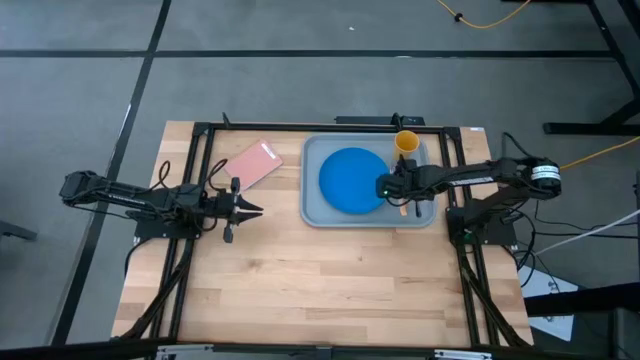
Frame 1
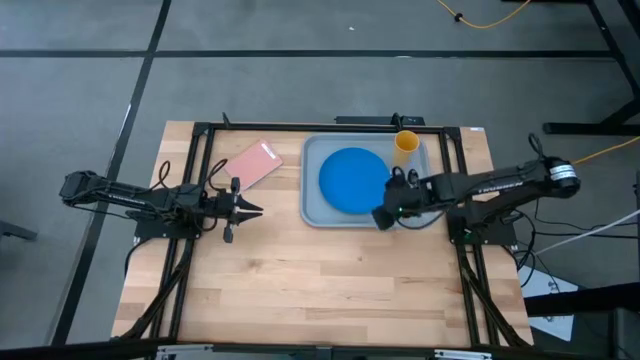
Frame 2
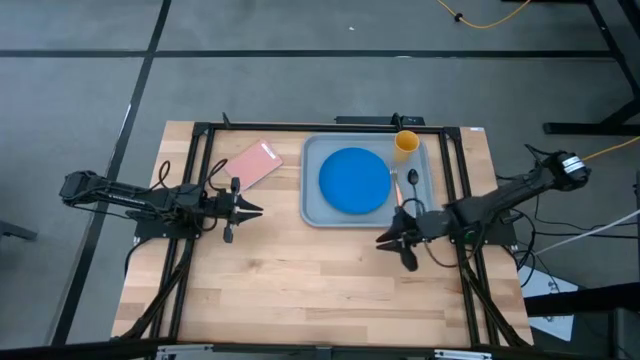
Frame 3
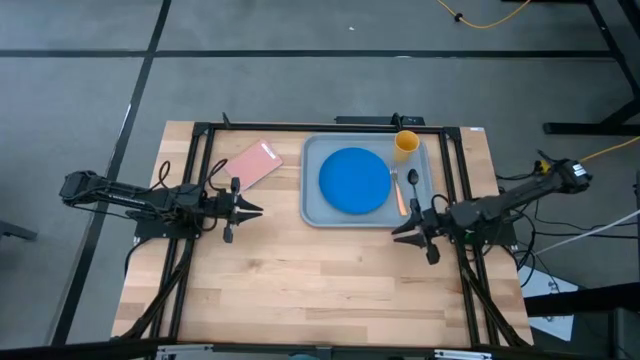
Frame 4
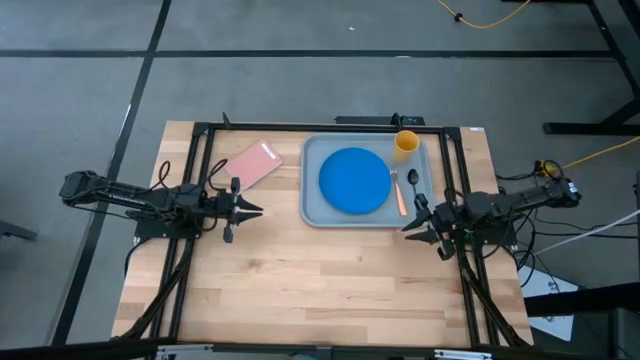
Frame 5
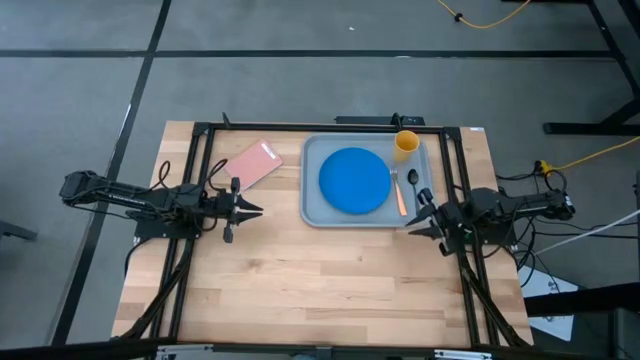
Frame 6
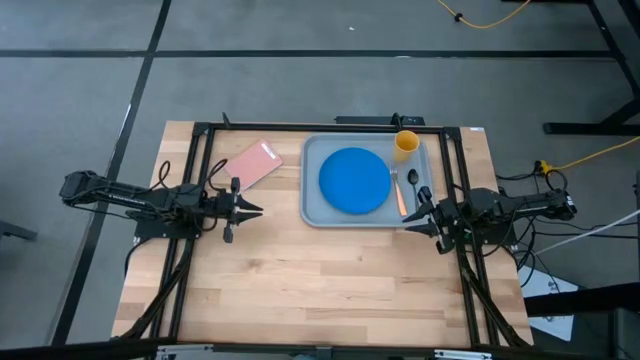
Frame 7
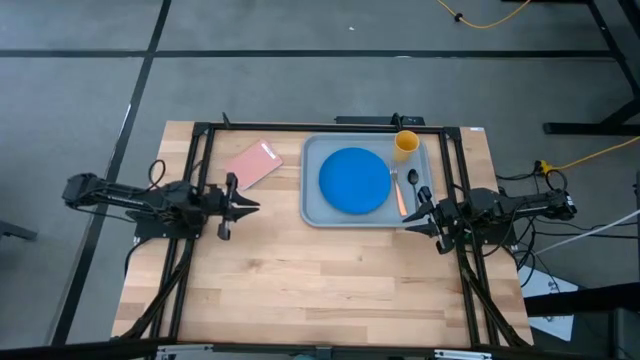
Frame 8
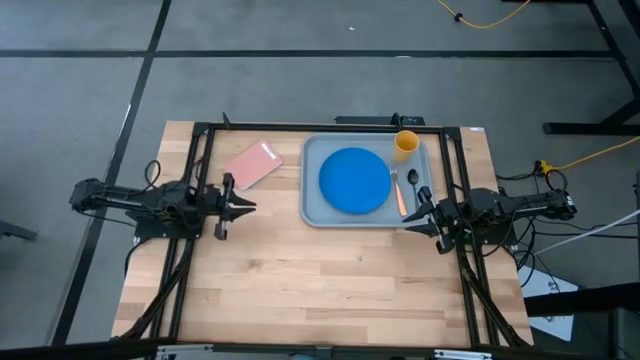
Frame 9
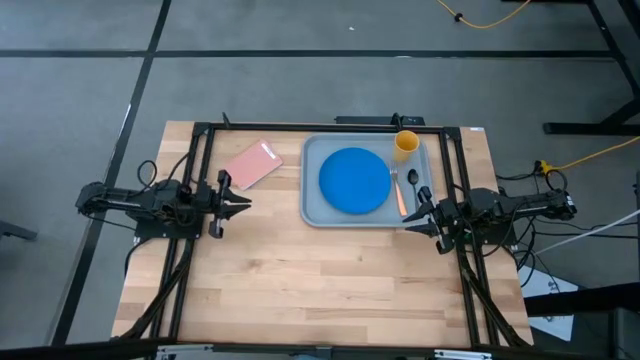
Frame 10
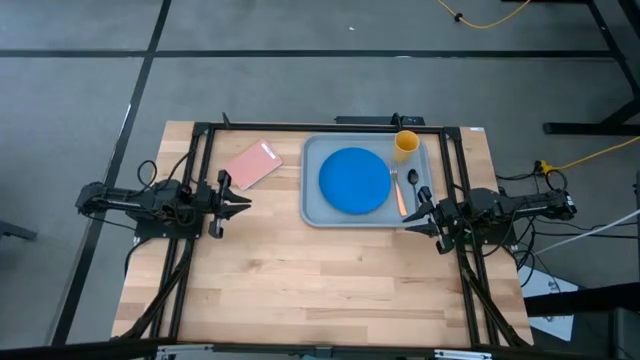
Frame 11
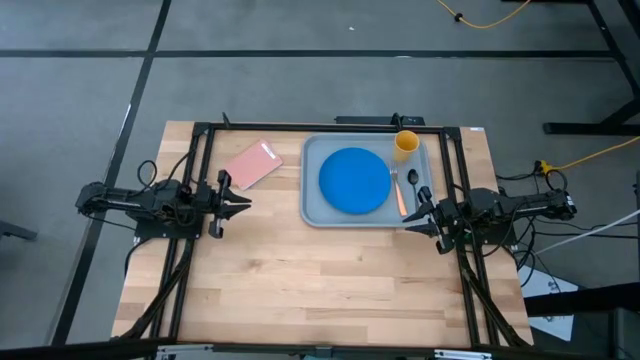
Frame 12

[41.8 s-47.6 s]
Task: Pick and place plate/cup/fork/spoon on tray
Return to Home Position

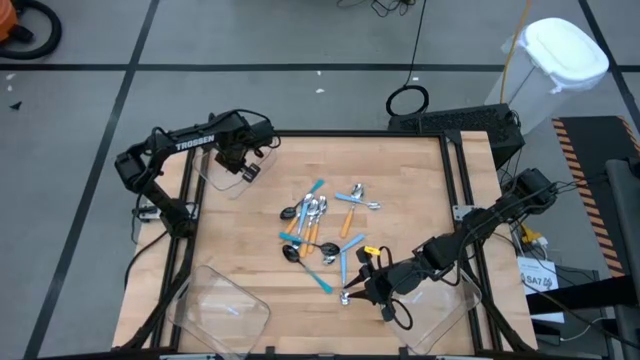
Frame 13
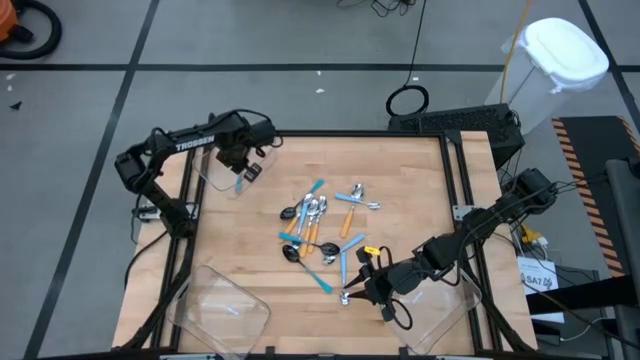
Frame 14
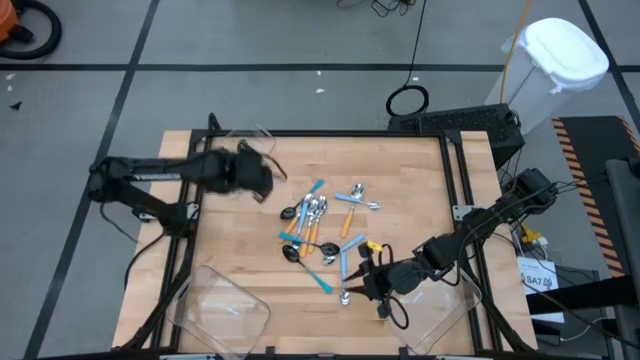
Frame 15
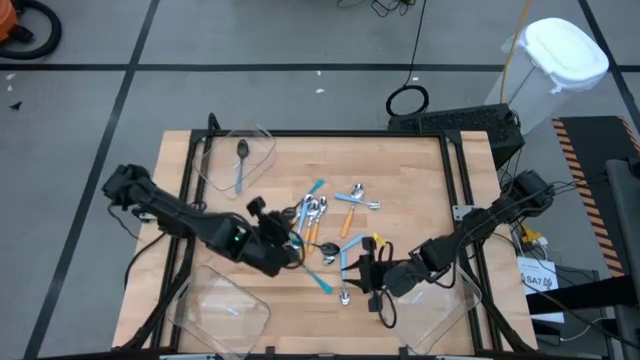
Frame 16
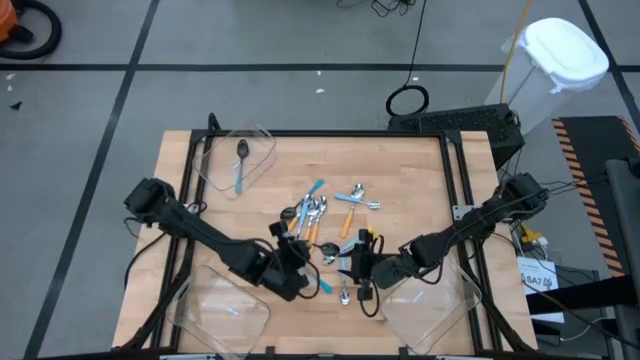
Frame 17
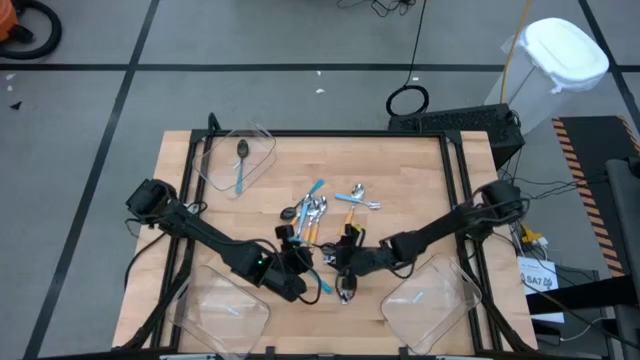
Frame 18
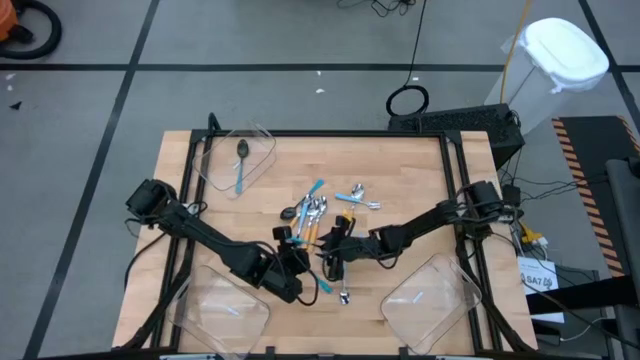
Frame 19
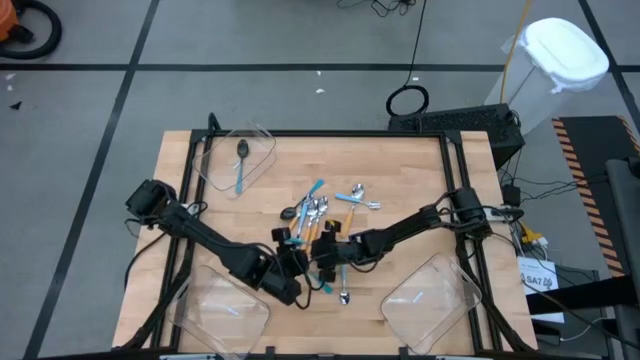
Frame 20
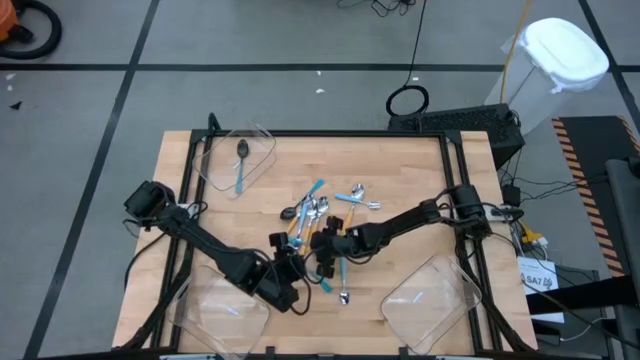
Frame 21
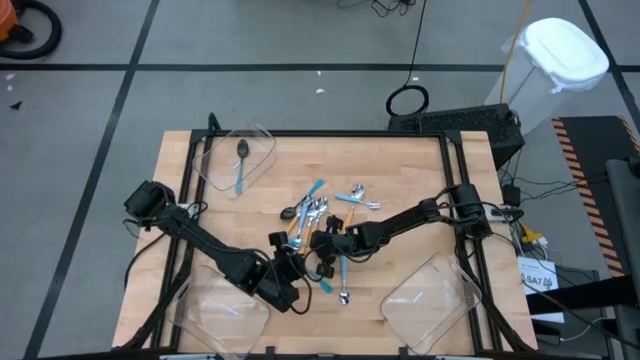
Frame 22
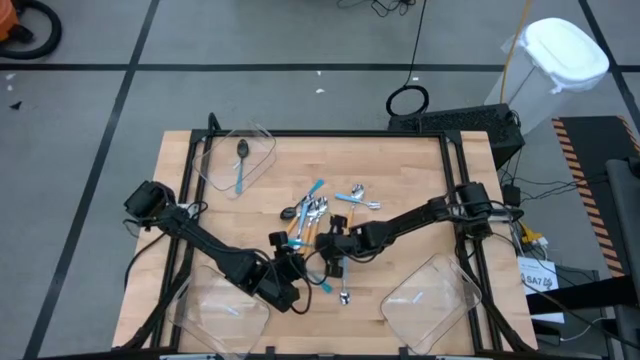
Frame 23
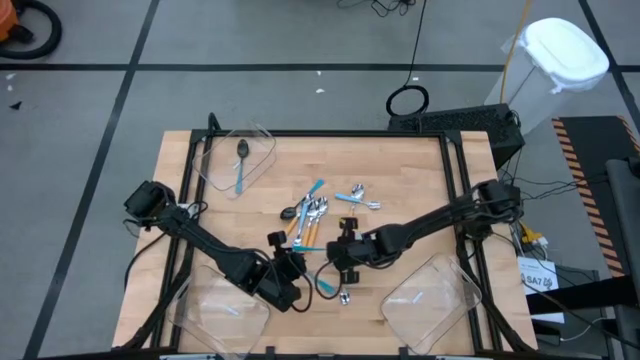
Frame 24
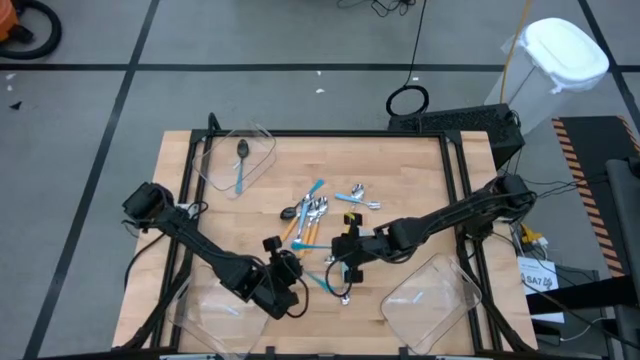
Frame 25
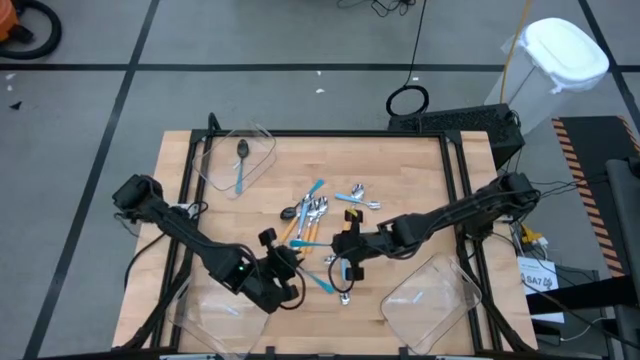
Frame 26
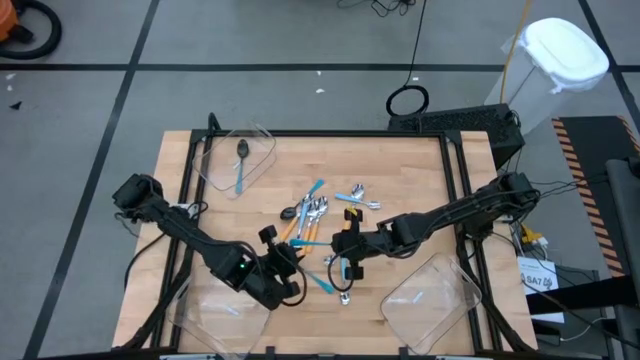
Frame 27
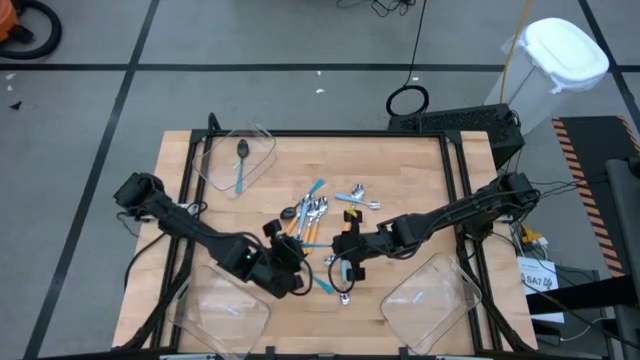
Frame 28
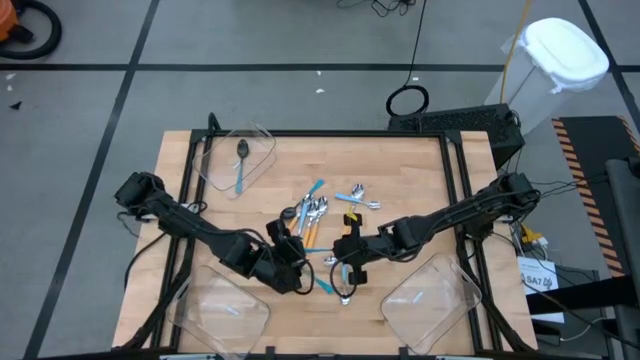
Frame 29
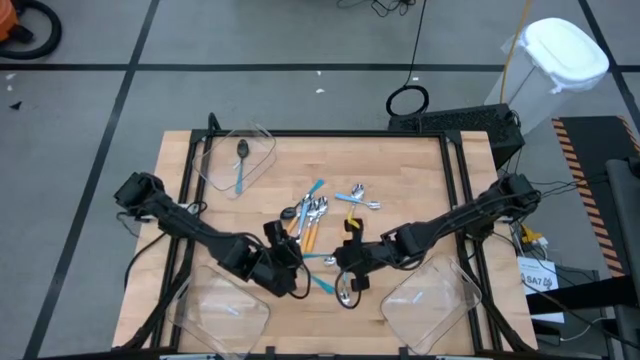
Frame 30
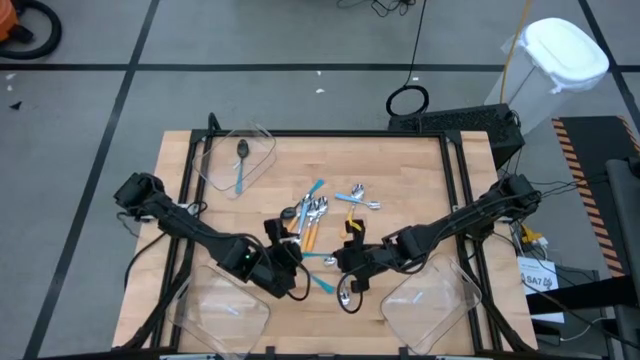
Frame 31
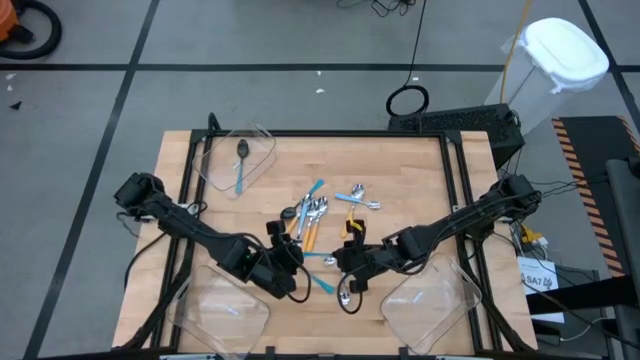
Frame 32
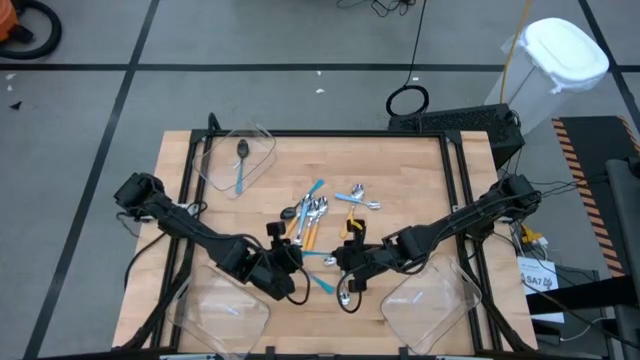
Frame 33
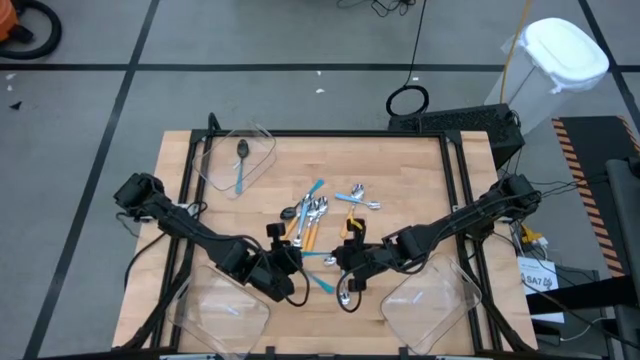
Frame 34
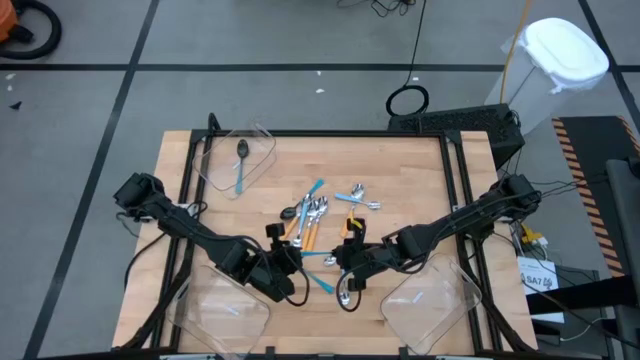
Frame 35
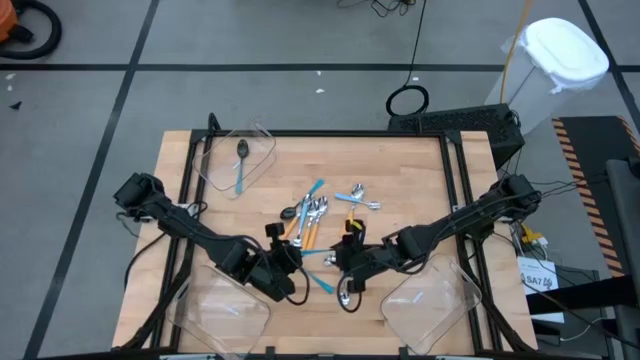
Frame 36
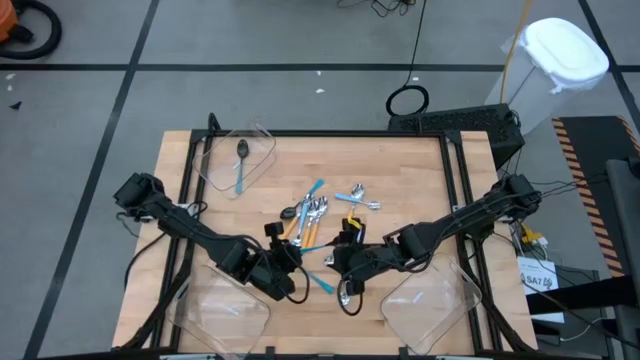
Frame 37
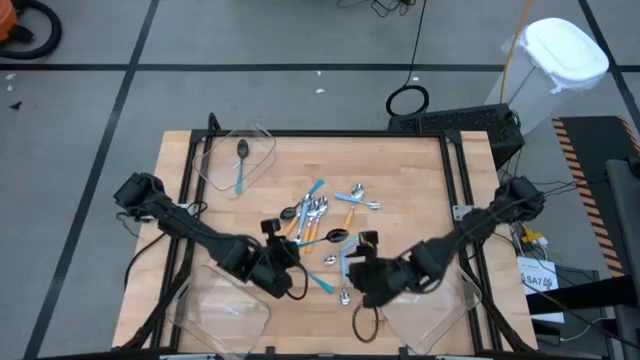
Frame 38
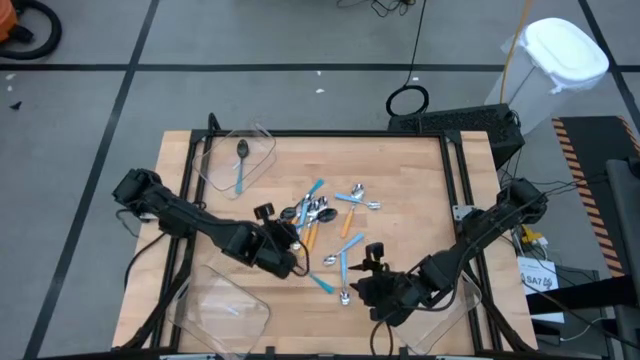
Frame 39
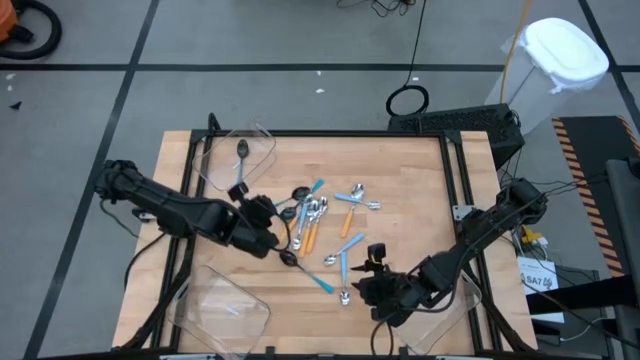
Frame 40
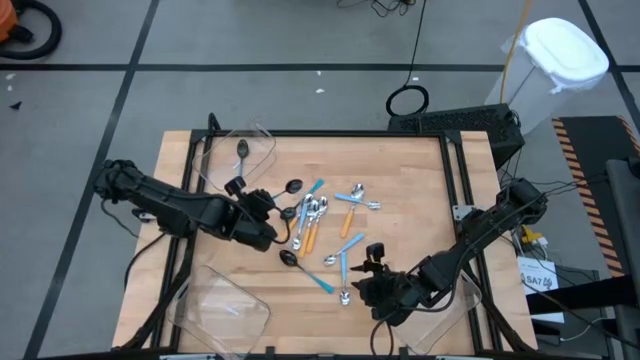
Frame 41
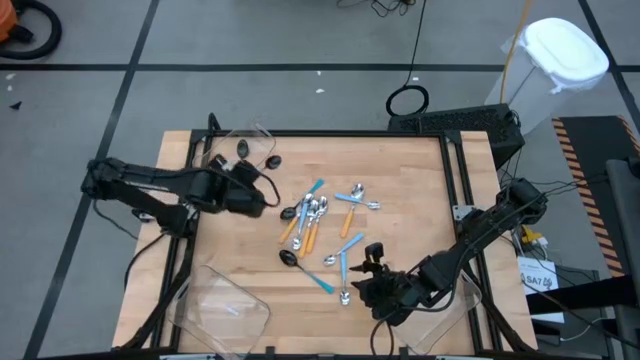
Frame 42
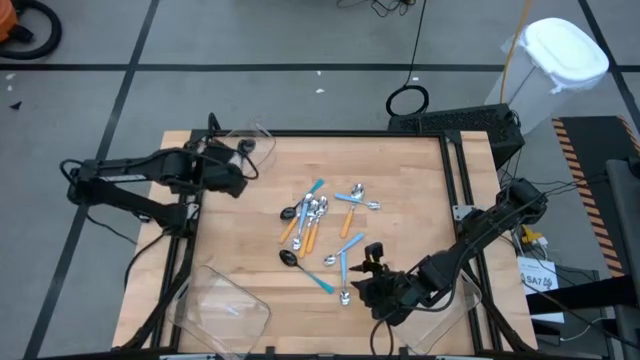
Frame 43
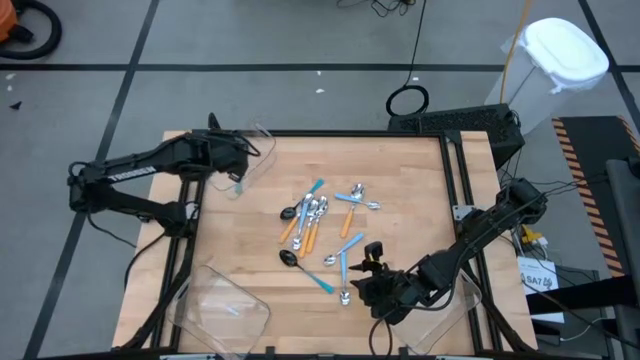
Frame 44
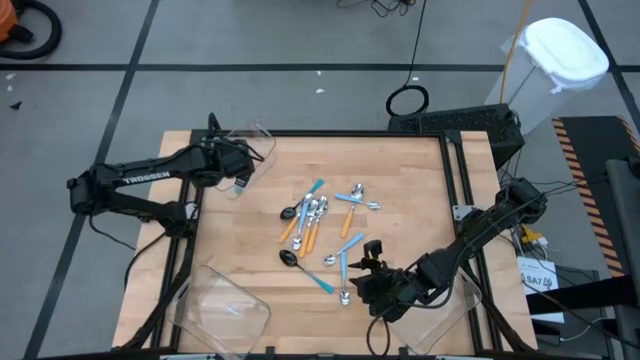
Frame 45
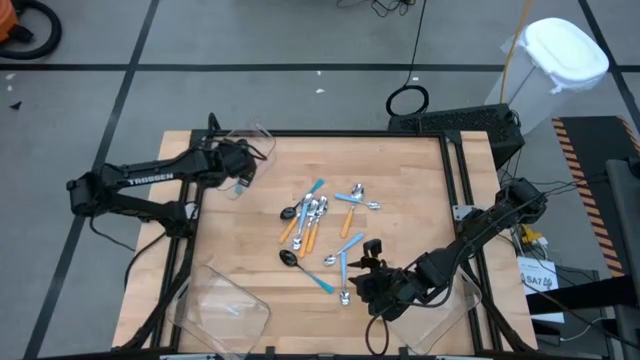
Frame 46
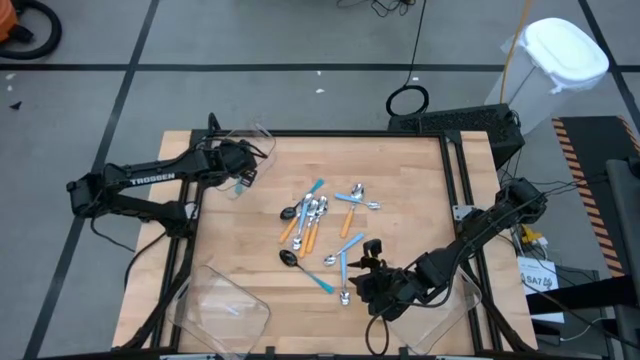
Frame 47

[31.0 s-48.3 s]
Task: Sort silverware by color (type)
Put the blue spoon into the top left transparent bin
